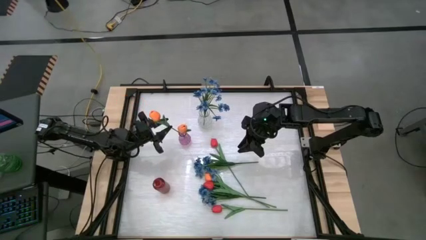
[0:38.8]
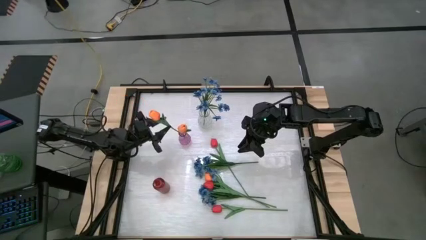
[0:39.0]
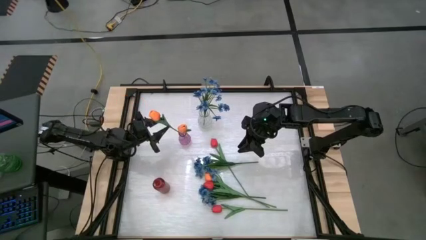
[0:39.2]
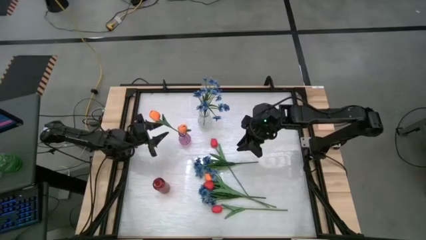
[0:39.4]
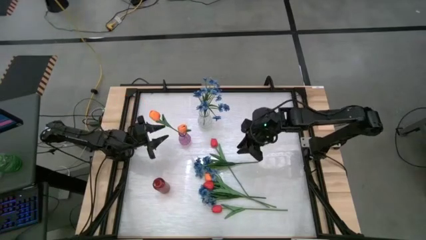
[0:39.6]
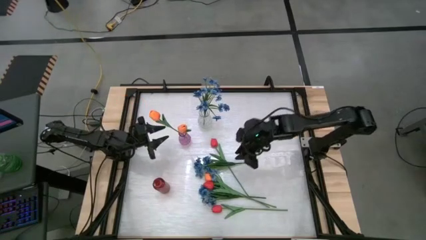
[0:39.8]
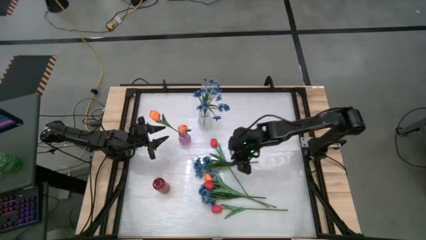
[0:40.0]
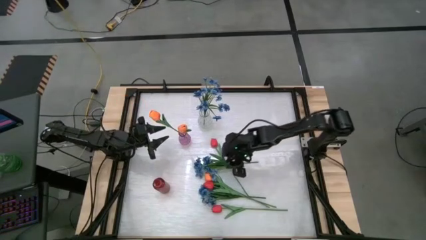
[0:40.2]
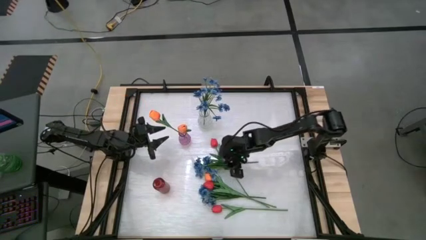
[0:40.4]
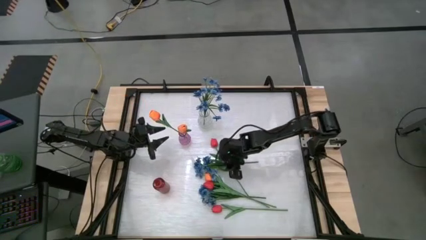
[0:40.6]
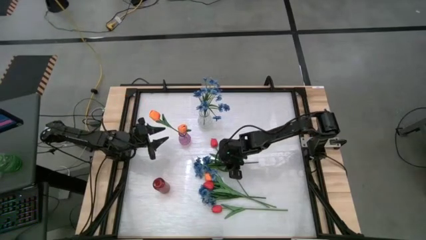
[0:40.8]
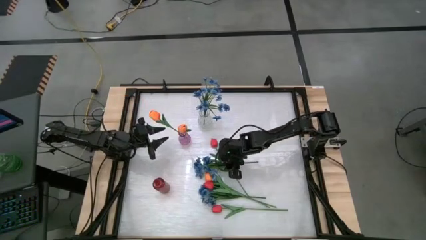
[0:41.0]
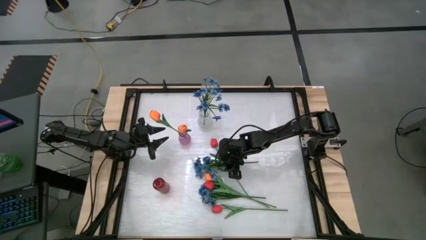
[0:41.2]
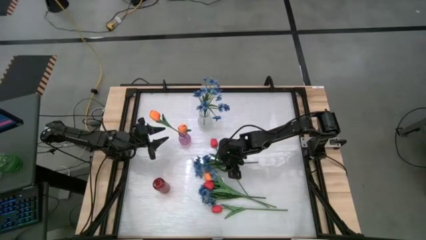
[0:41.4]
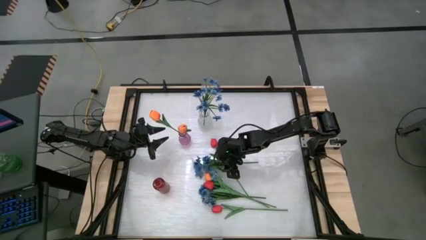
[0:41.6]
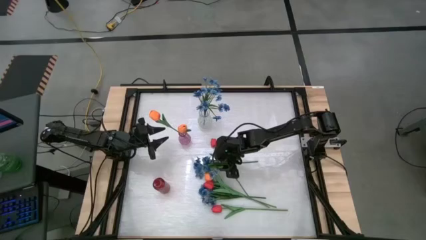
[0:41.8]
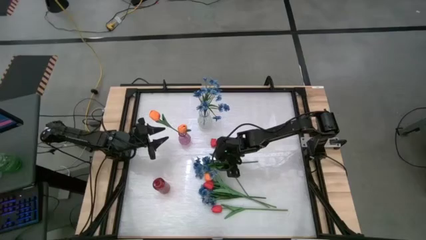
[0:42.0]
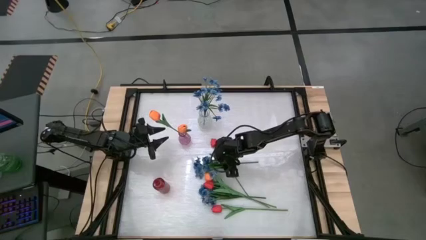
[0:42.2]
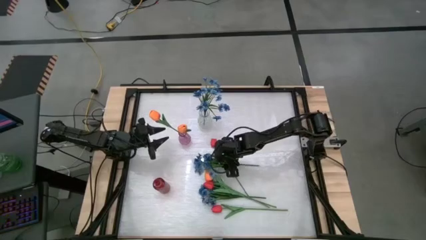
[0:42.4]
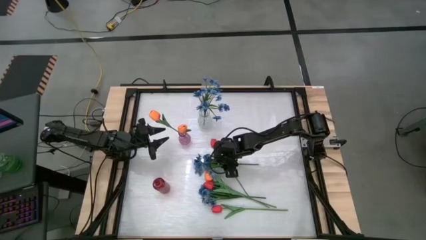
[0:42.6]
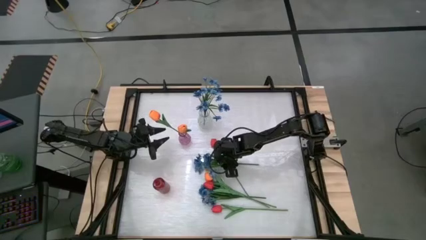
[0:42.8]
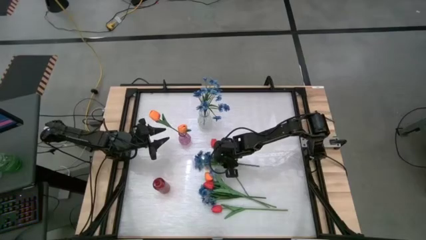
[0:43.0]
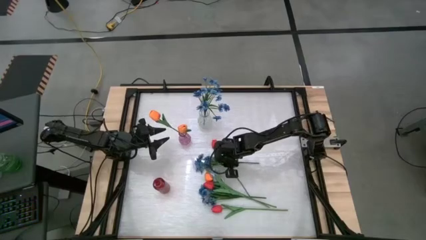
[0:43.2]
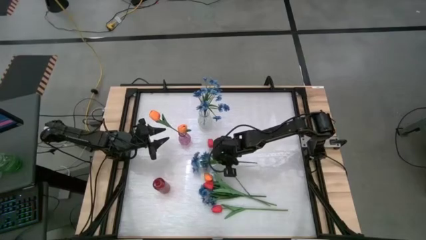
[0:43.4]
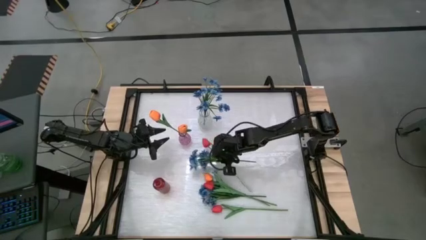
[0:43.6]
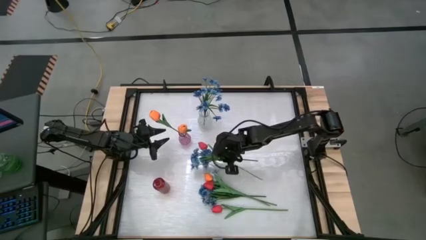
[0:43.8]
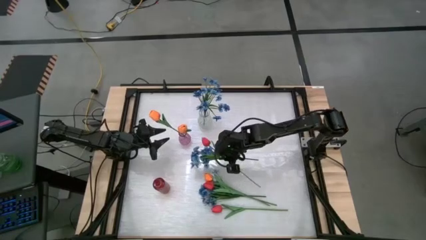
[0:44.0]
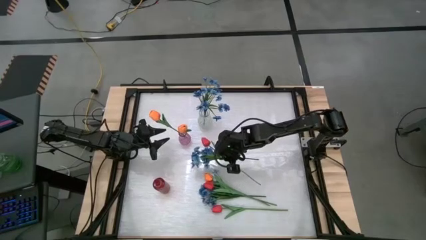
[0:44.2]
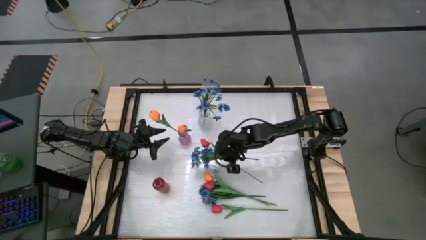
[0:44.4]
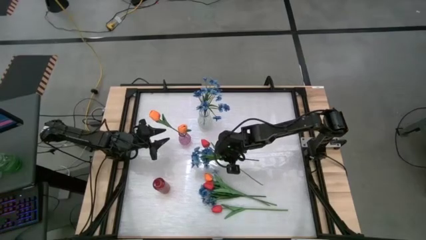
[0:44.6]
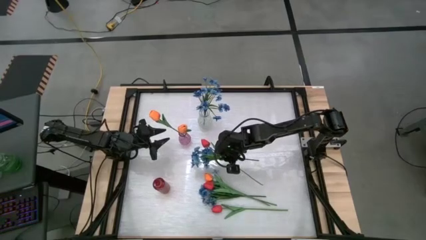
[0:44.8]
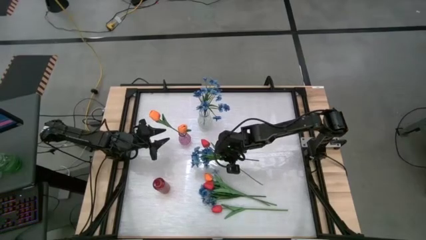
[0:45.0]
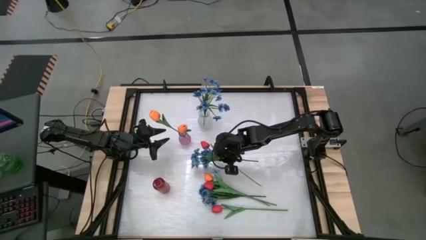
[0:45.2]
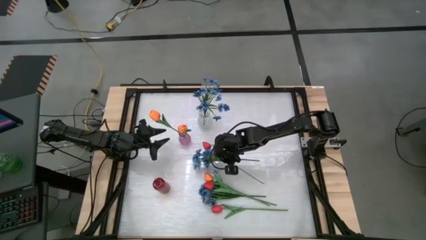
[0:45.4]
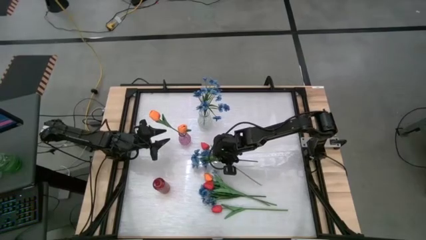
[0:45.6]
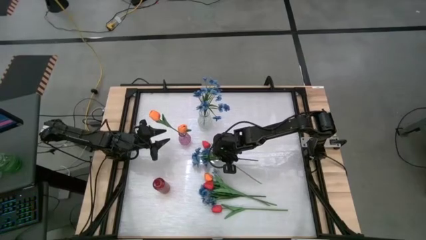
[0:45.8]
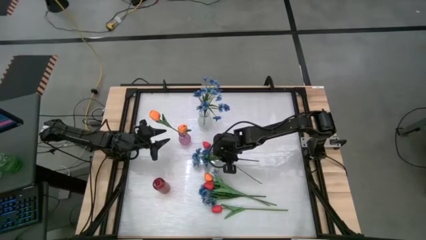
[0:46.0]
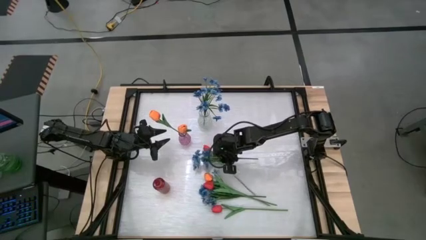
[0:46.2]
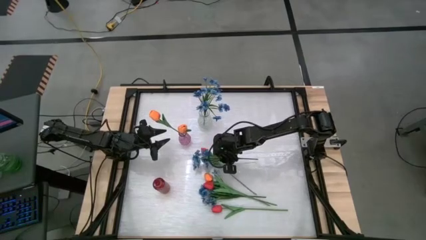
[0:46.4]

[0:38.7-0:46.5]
Task: Sort flowers into vase by color
Put the top blue flowers into the transparent vase

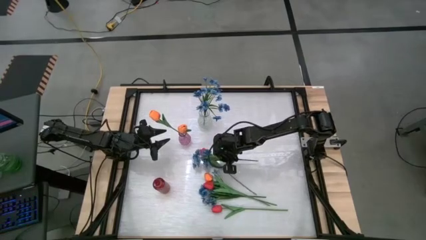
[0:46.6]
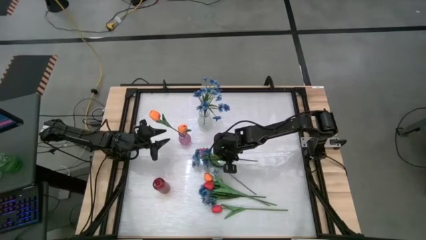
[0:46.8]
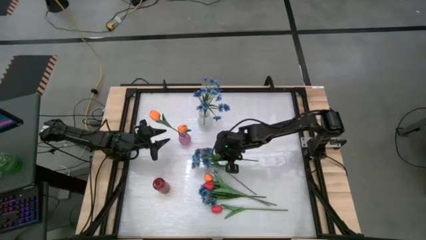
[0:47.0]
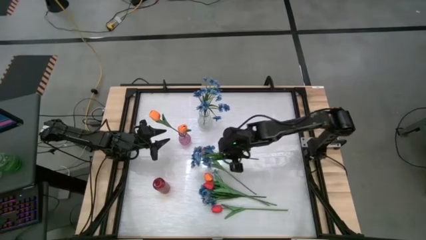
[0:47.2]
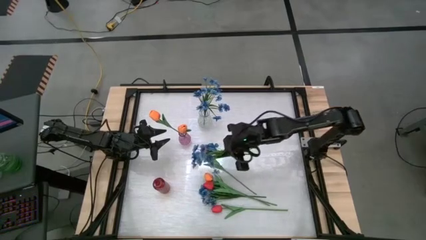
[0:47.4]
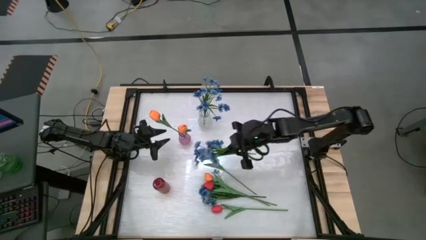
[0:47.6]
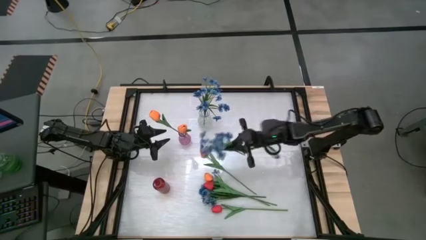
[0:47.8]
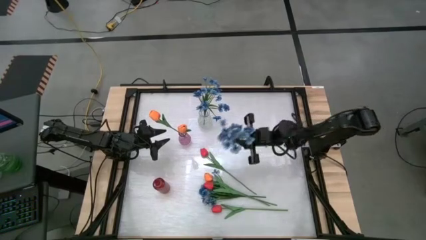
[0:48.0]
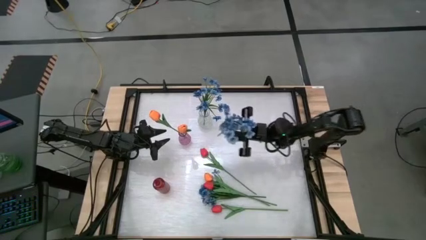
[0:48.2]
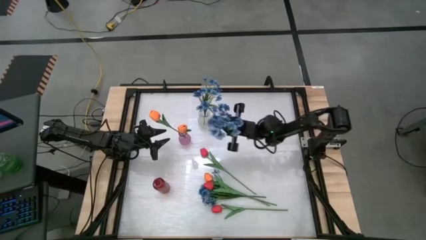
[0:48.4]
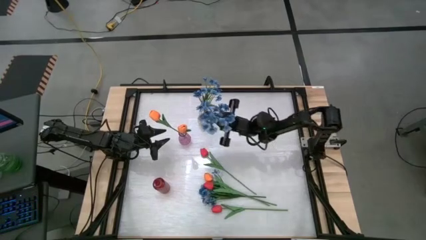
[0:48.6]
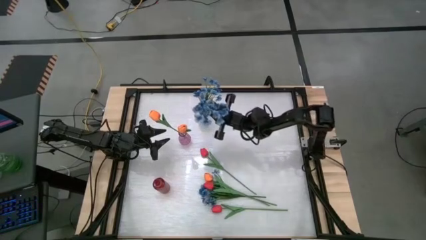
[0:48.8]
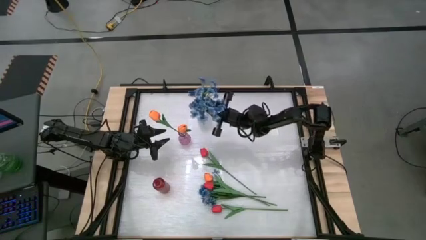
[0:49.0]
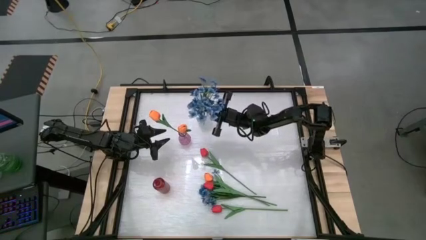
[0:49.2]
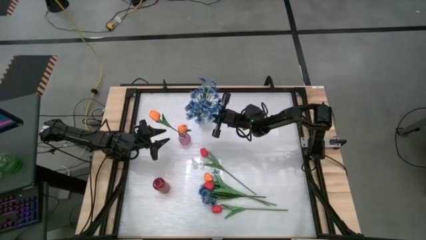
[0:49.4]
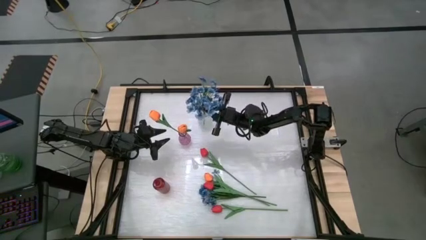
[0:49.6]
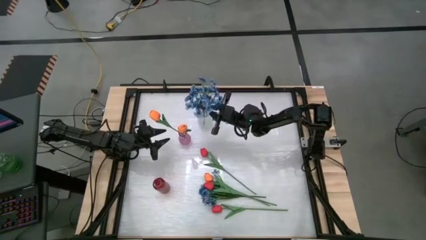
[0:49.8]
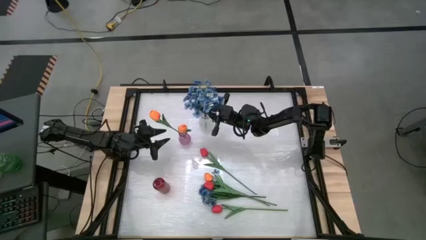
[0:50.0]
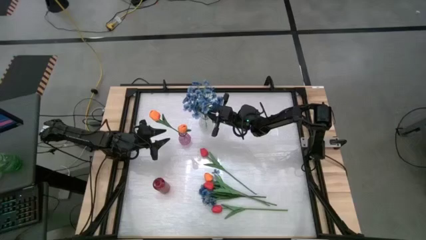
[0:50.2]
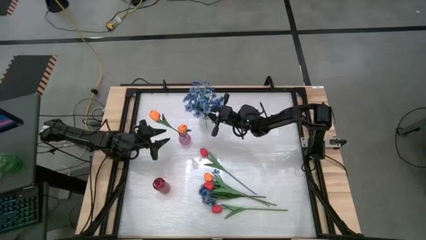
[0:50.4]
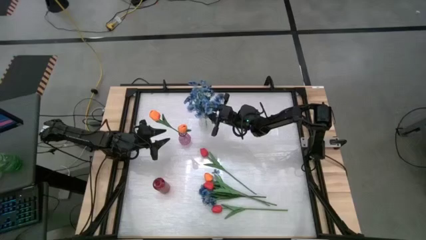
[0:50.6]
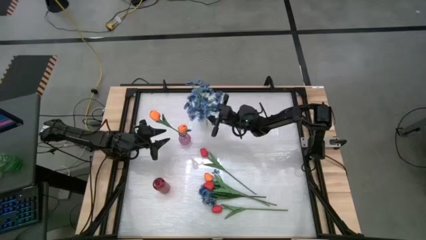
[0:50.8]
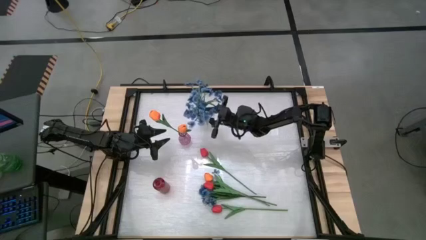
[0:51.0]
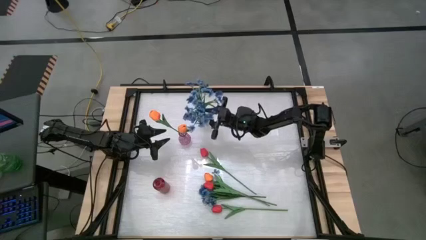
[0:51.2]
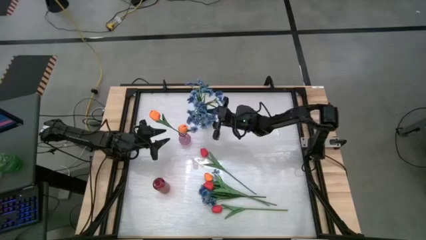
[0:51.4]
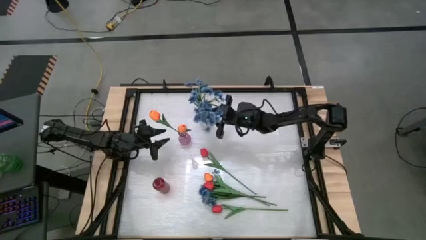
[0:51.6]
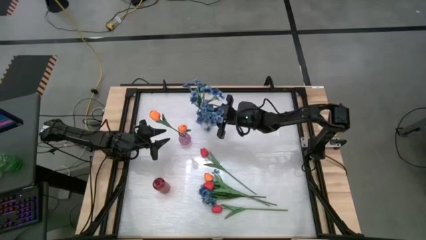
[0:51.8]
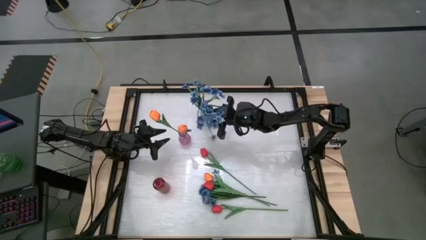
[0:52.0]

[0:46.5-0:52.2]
Put the top blue flowers into the transparent vase
